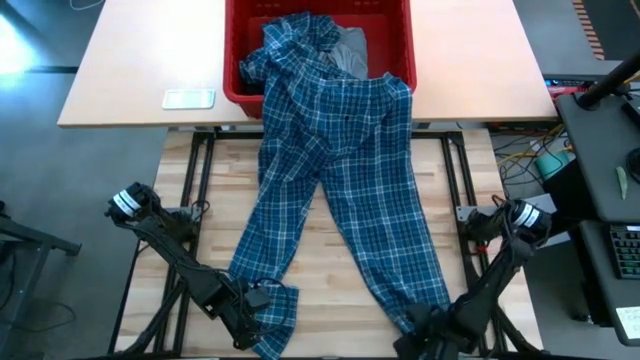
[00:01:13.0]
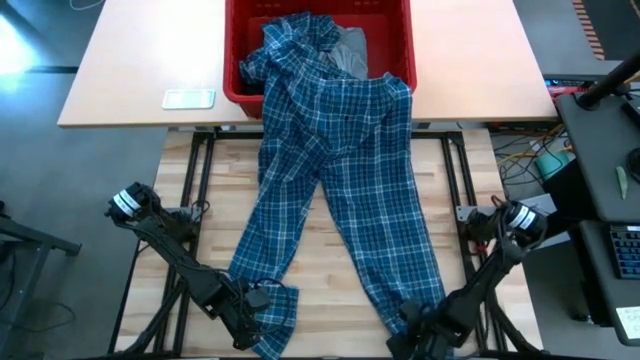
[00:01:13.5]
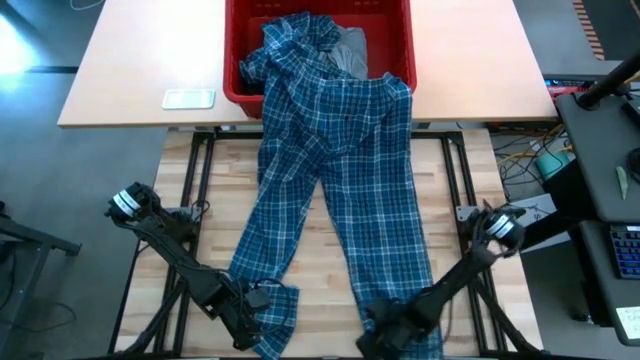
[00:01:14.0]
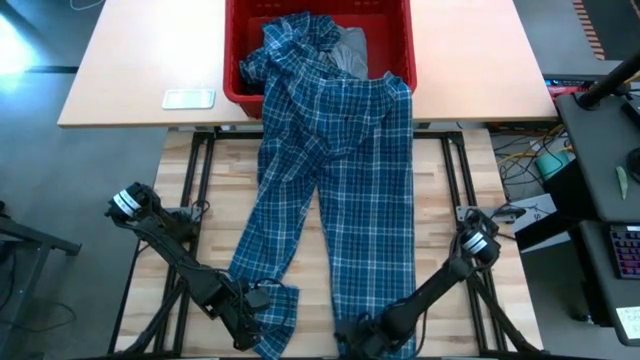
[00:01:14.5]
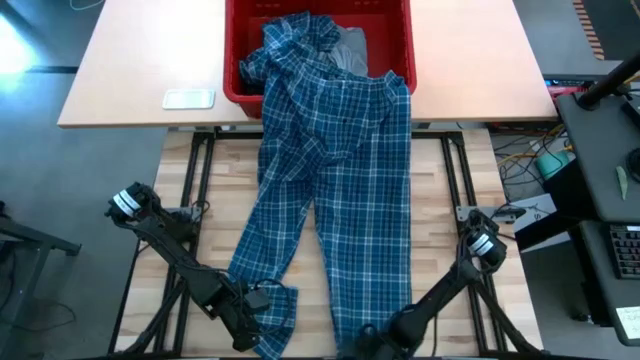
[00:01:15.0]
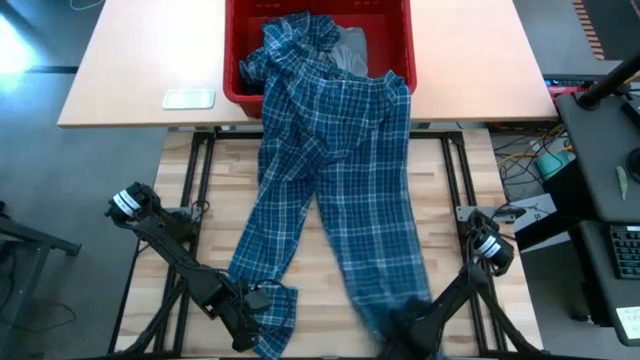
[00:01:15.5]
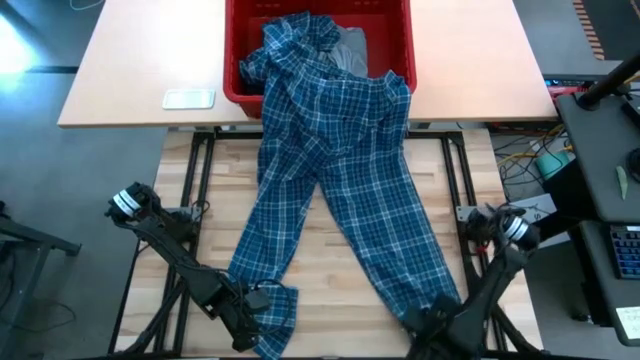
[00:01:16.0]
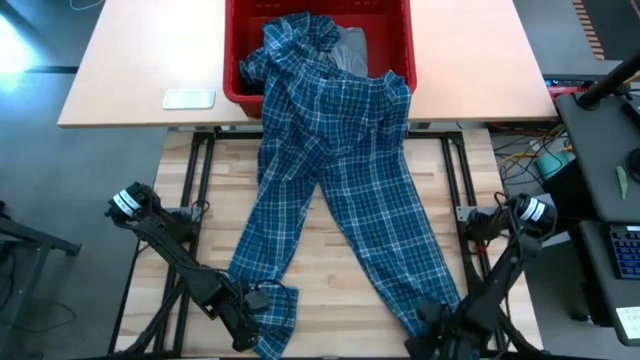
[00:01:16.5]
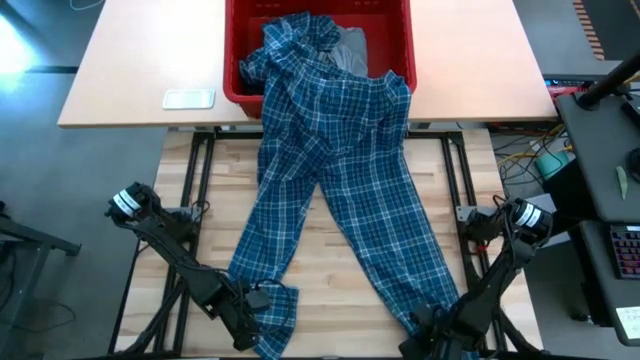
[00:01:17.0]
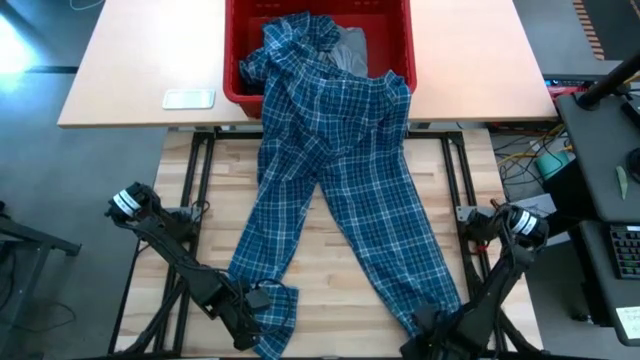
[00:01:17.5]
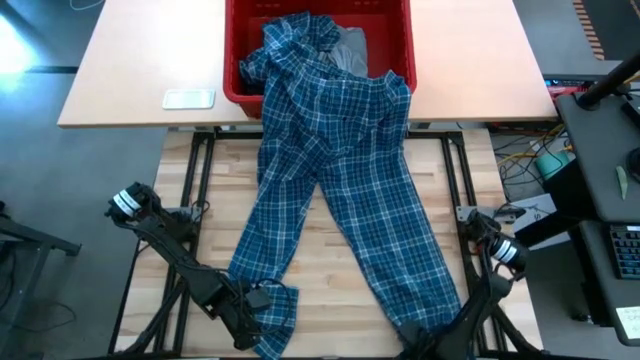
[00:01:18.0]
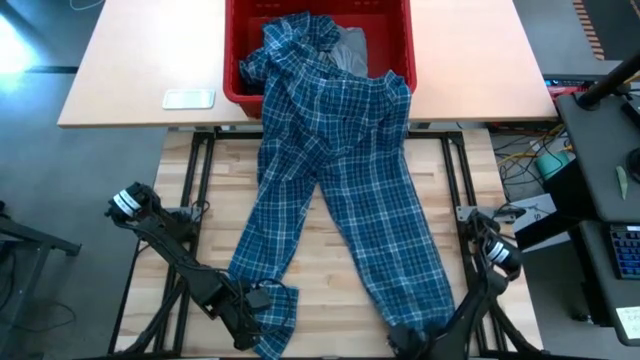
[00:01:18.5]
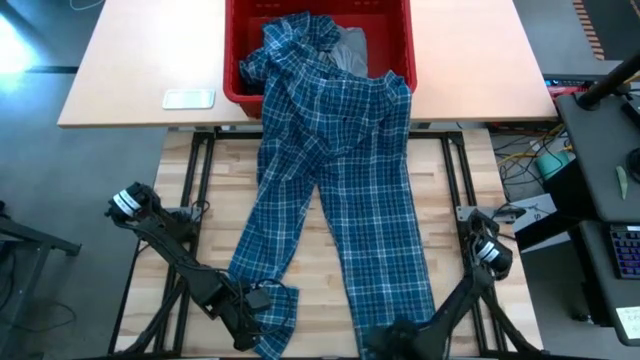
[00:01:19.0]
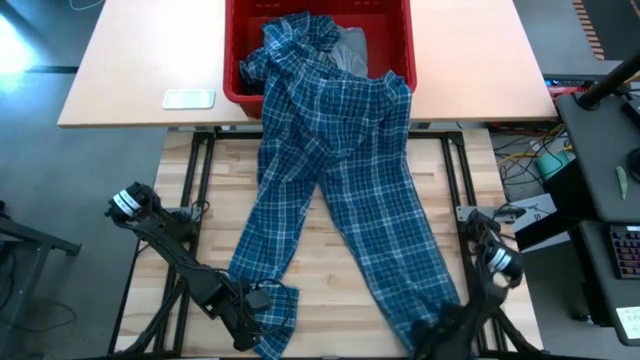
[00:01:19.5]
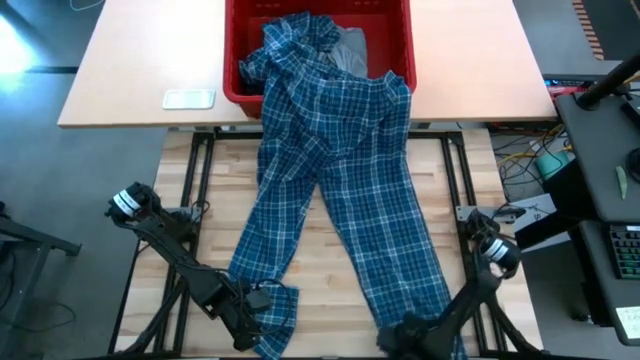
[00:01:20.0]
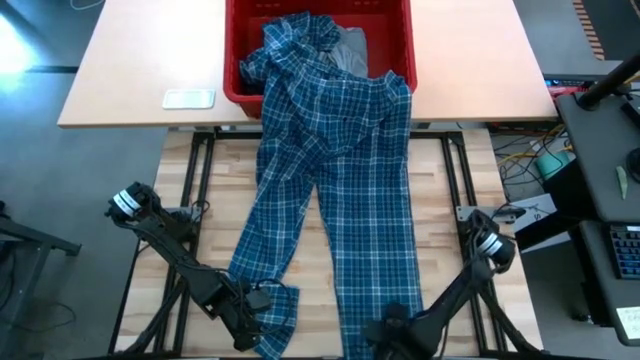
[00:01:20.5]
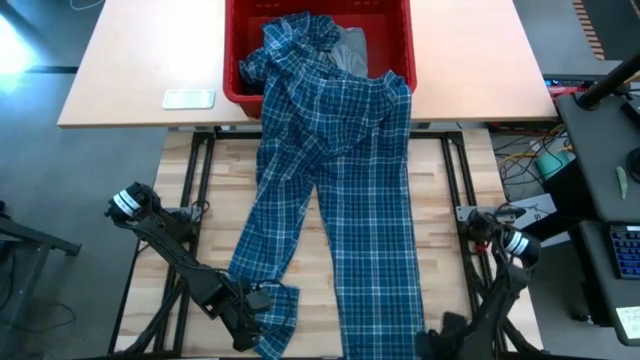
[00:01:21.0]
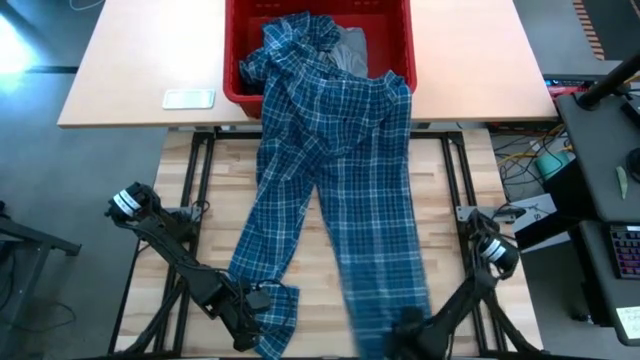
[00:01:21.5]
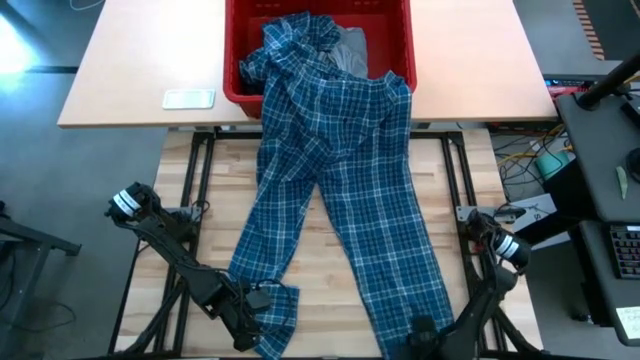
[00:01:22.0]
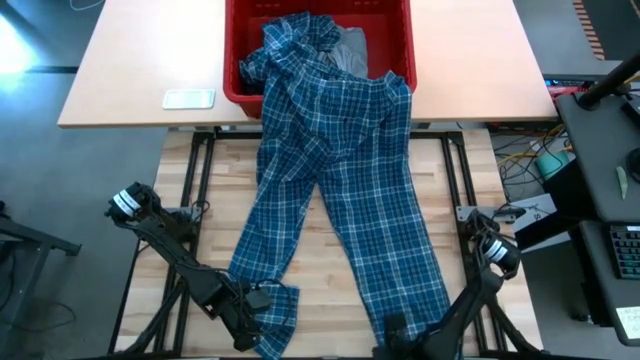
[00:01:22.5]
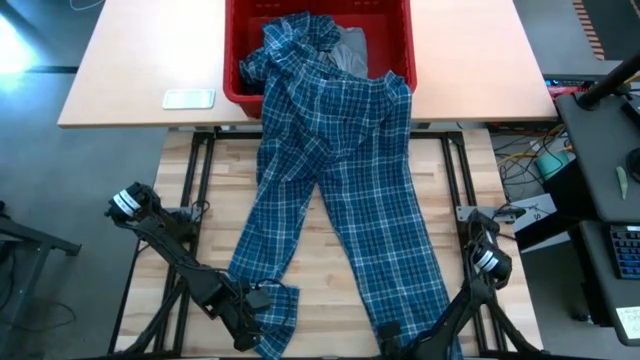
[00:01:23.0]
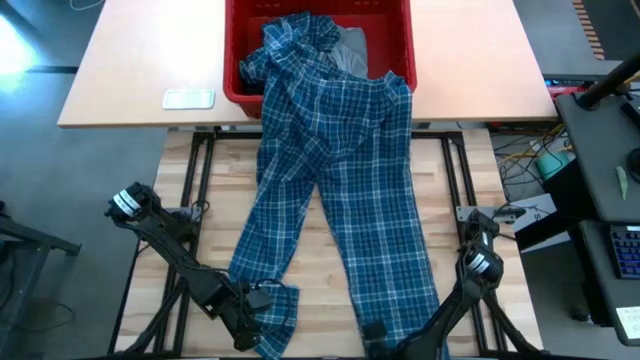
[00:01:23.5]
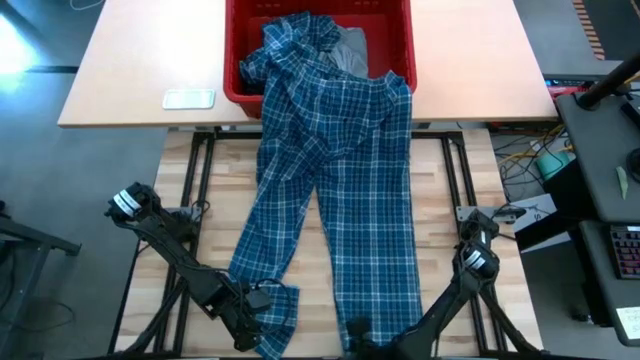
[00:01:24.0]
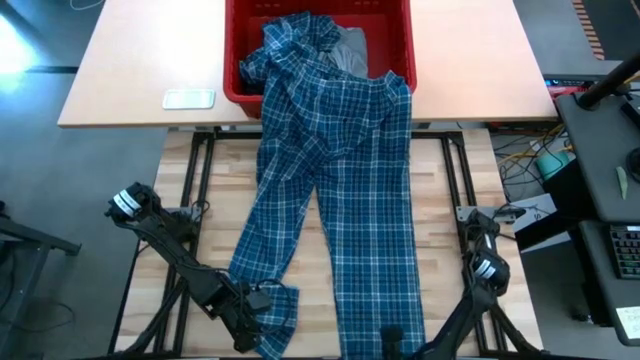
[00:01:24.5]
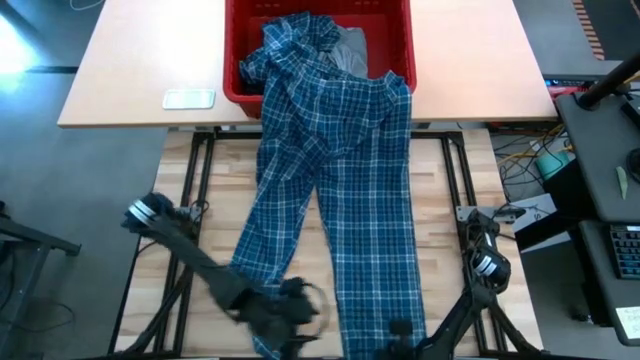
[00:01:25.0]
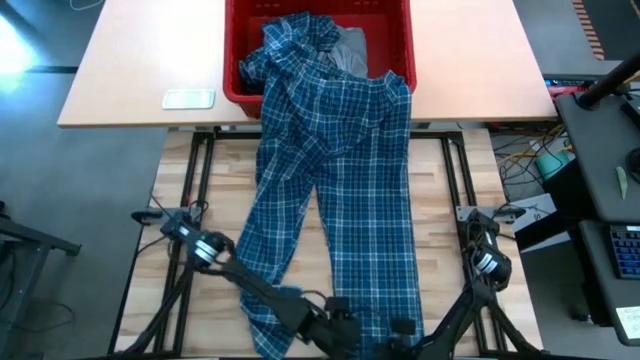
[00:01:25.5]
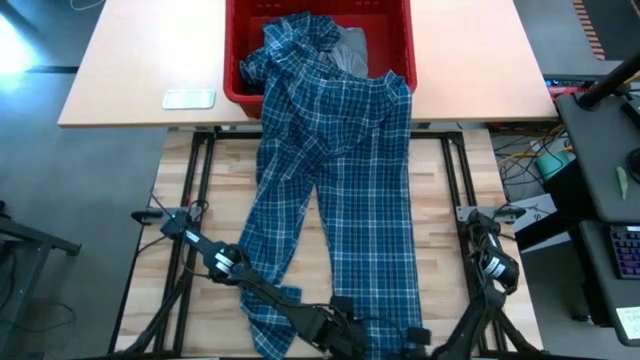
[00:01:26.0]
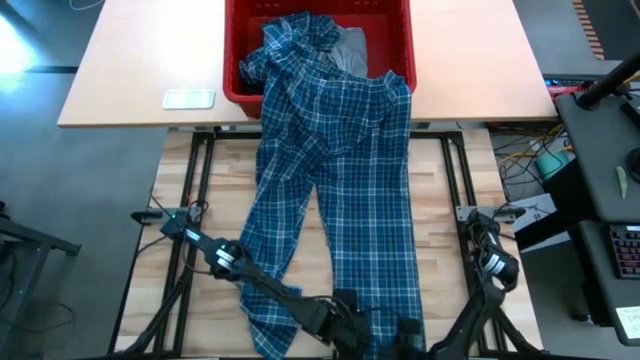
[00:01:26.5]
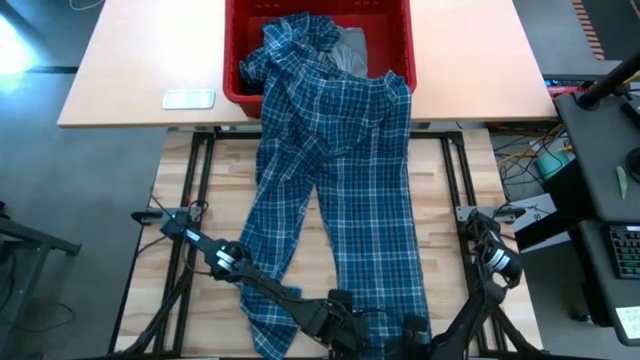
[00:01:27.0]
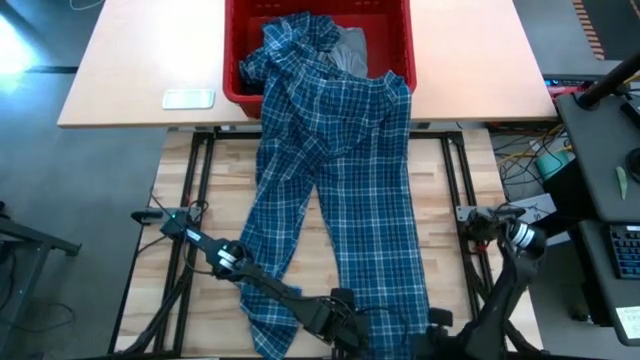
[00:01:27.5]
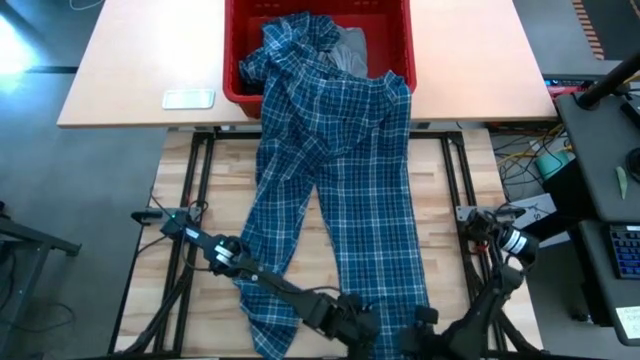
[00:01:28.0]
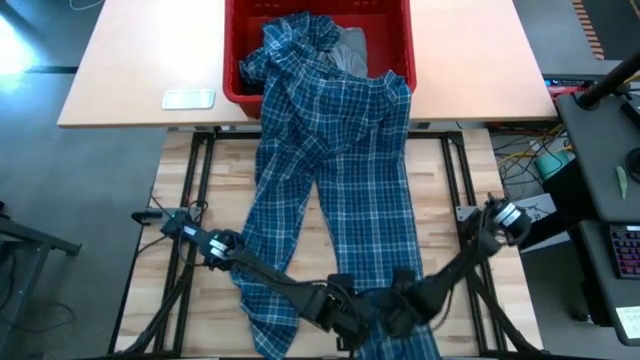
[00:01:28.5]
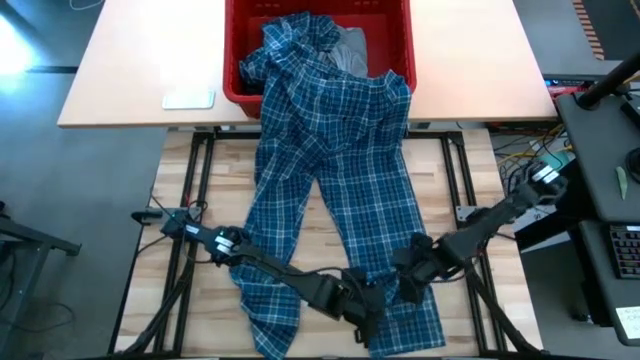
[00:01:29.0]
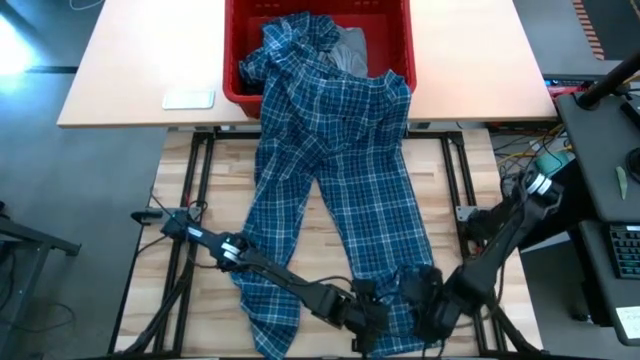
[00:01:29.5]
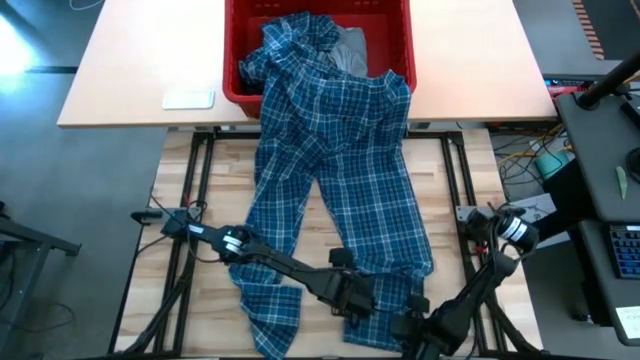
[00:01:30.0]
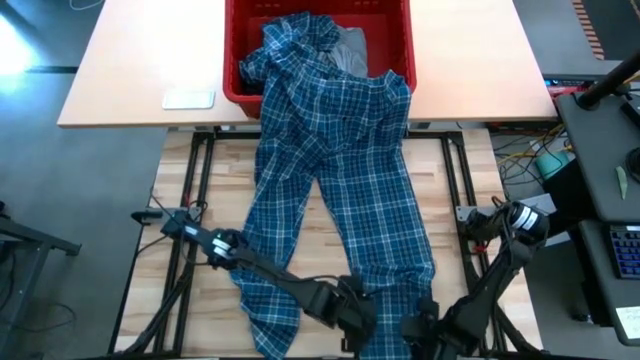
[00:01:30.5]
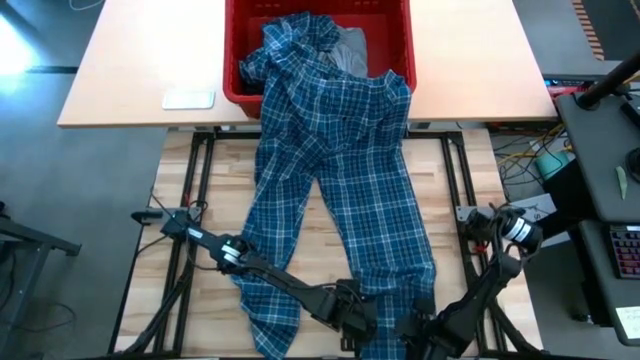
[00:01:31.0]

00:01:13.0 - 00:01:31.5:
Task: Fold Laundry from Bin
Fold the blue patterned pants

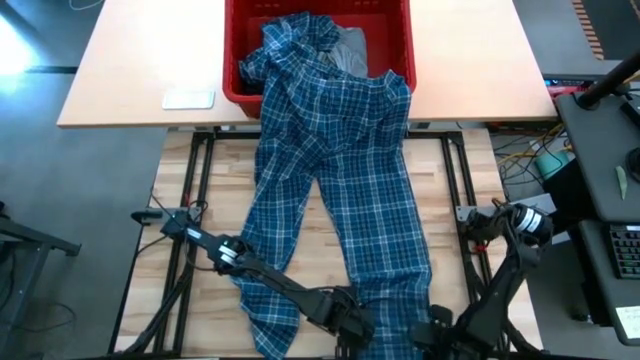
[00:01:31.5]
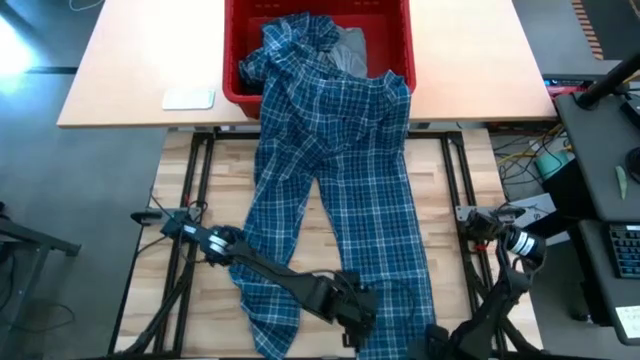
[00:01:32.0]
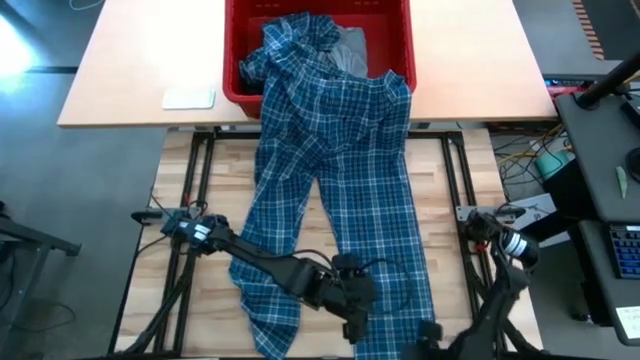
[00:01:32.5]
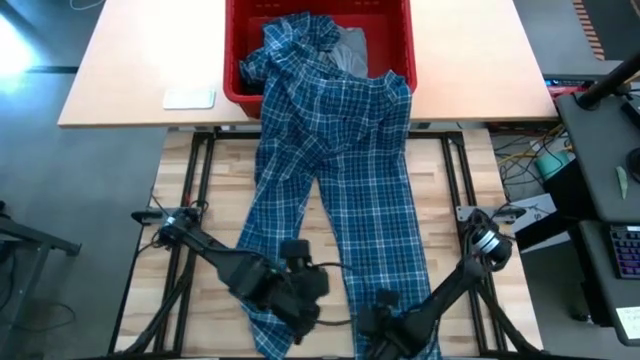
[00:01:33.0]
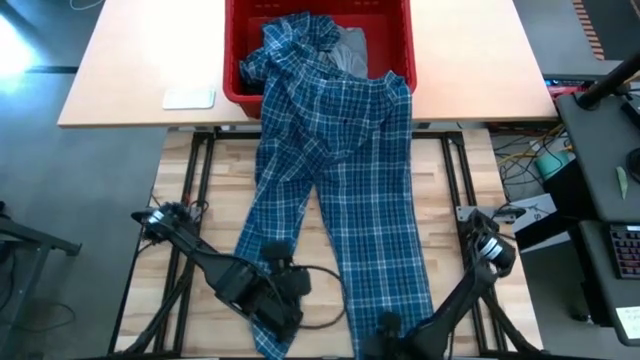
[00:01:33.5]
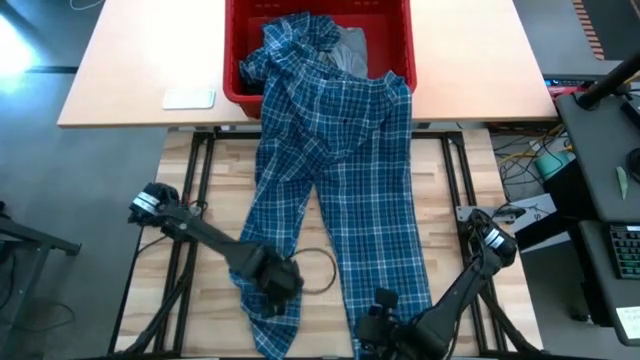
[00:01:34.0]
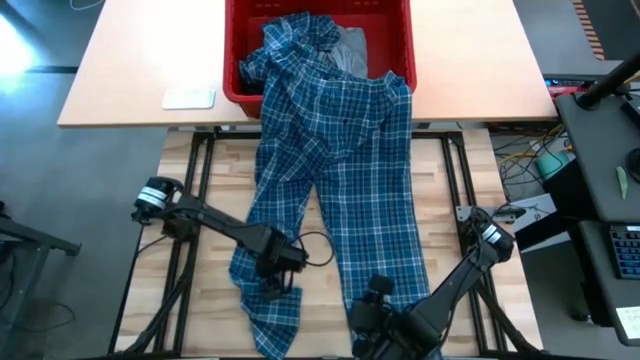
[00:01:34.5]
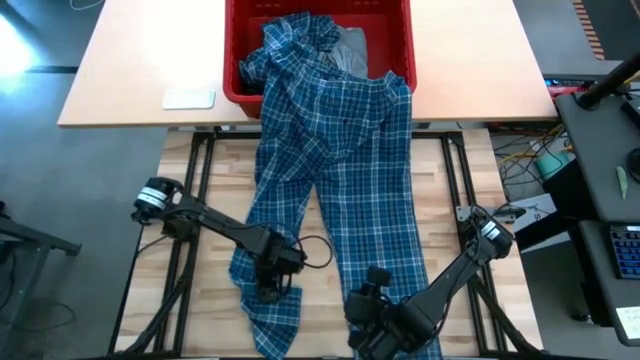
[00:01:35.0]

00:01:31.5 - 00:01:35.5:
Fold the blue patterned pants
